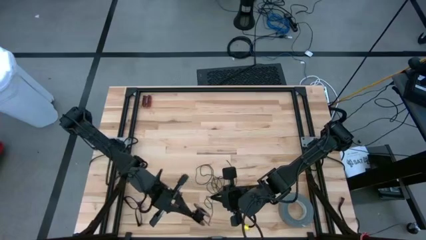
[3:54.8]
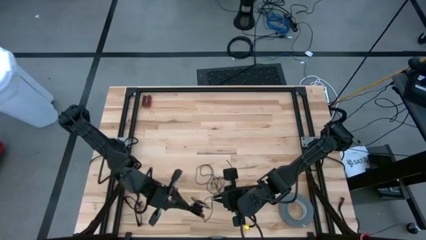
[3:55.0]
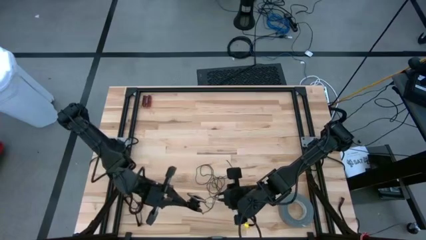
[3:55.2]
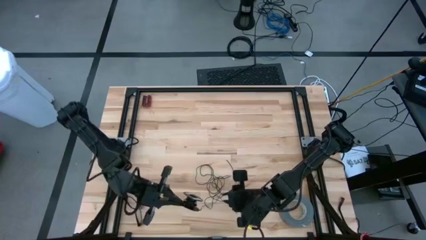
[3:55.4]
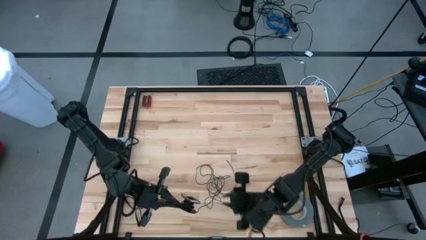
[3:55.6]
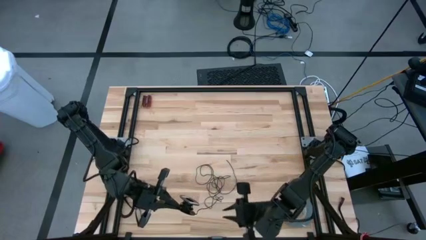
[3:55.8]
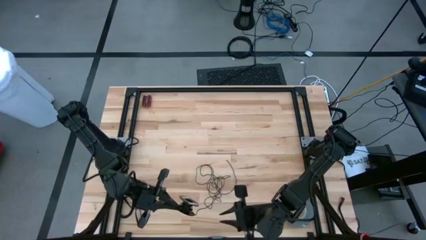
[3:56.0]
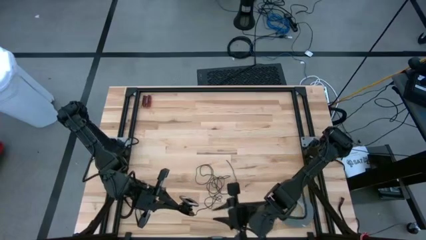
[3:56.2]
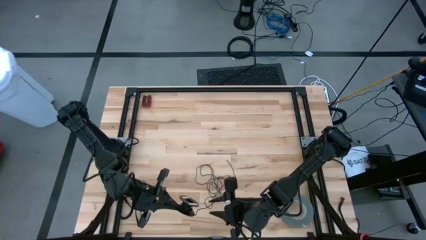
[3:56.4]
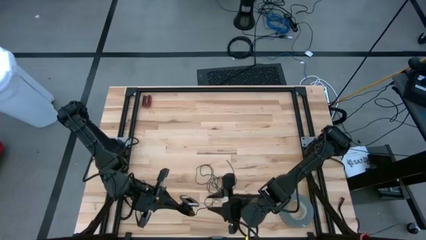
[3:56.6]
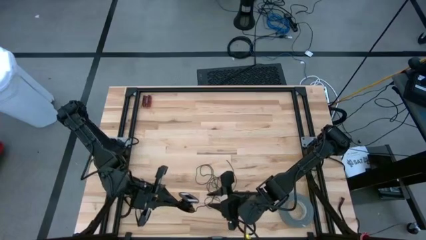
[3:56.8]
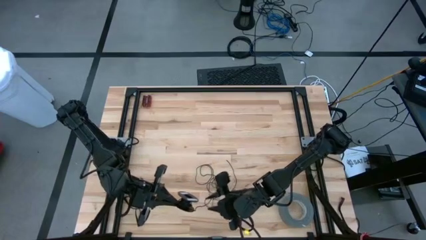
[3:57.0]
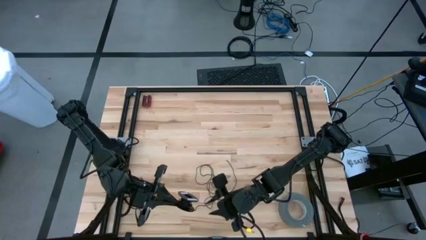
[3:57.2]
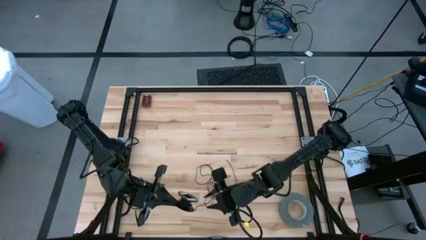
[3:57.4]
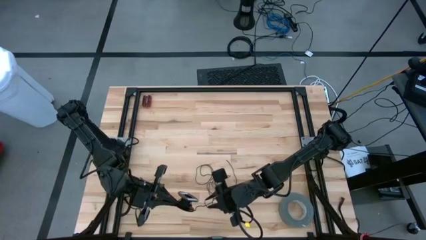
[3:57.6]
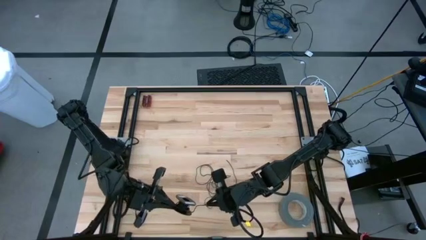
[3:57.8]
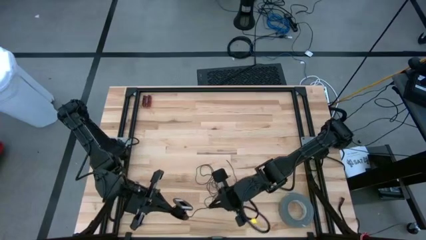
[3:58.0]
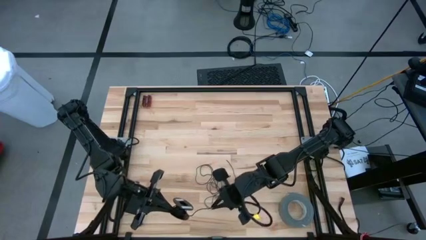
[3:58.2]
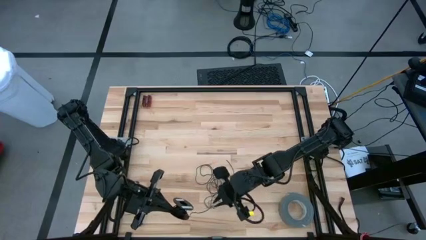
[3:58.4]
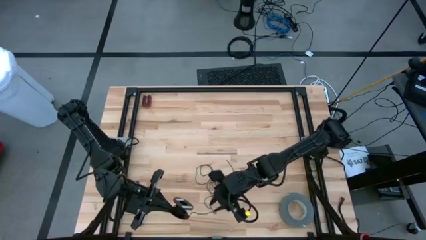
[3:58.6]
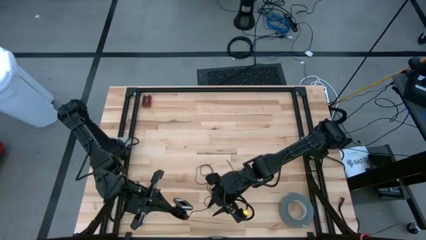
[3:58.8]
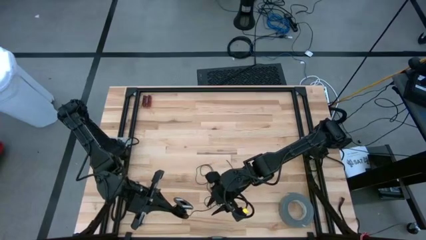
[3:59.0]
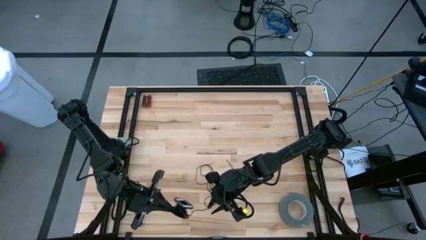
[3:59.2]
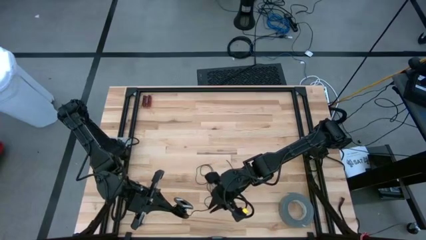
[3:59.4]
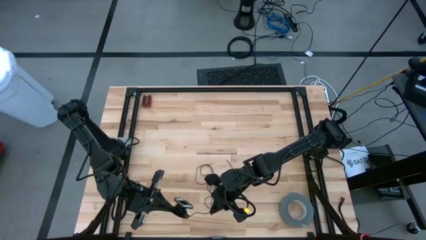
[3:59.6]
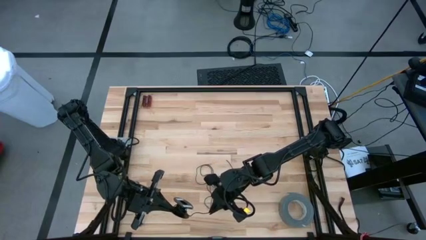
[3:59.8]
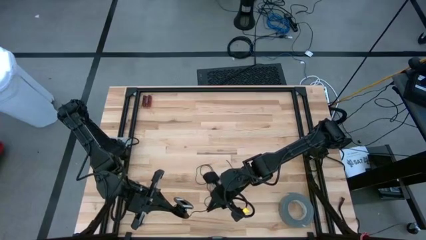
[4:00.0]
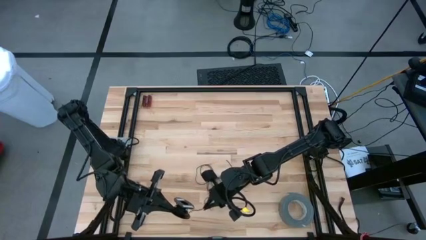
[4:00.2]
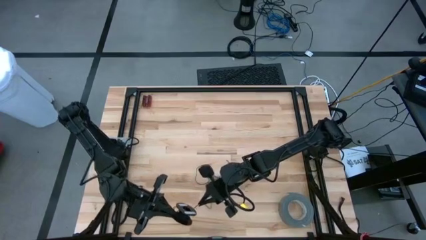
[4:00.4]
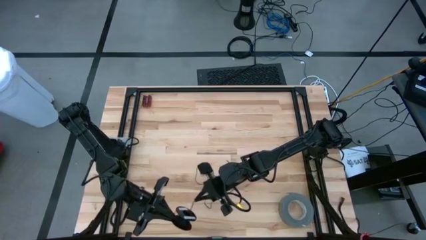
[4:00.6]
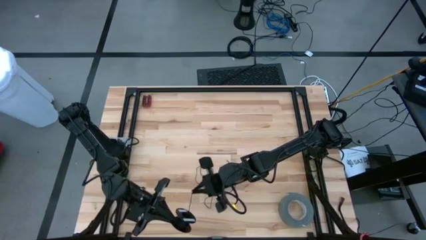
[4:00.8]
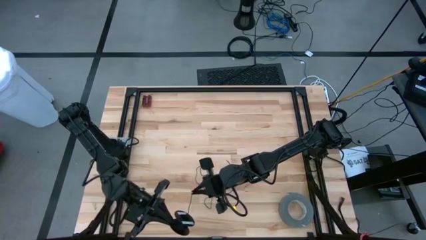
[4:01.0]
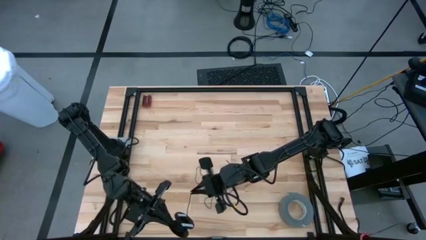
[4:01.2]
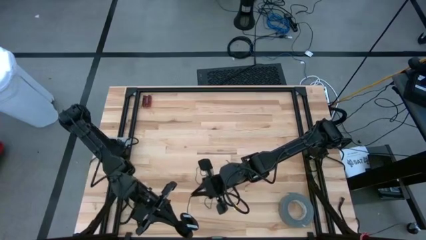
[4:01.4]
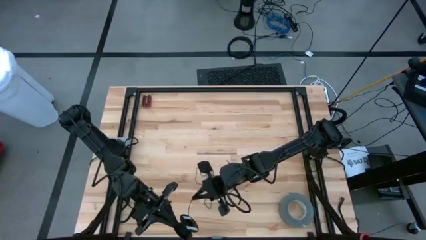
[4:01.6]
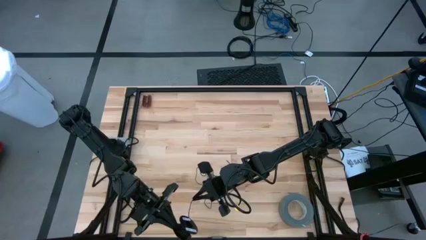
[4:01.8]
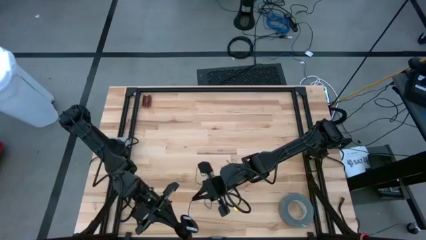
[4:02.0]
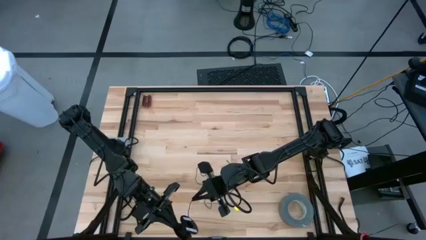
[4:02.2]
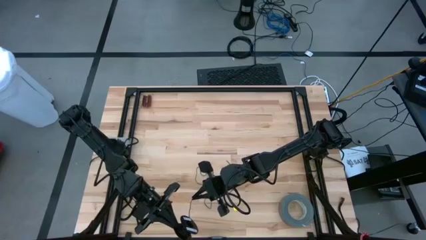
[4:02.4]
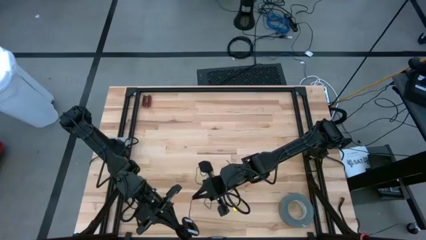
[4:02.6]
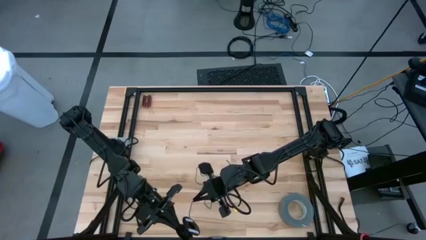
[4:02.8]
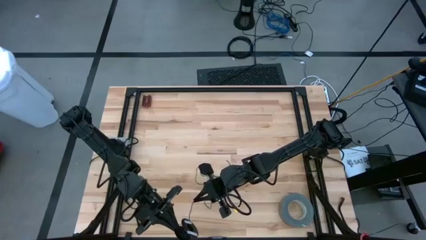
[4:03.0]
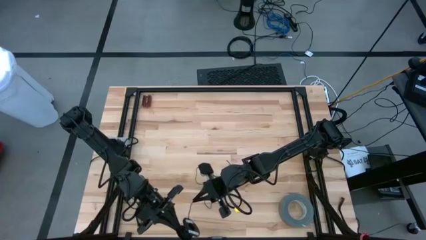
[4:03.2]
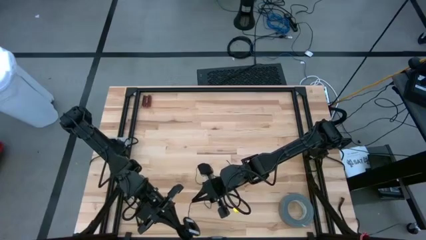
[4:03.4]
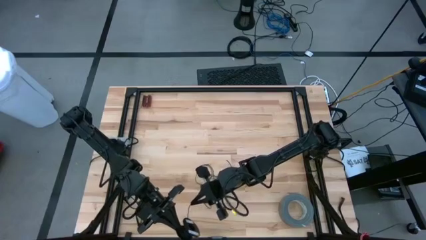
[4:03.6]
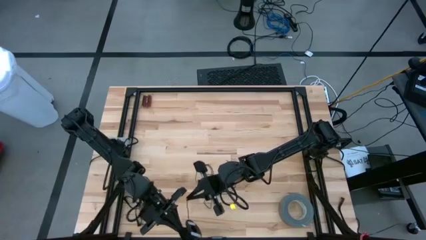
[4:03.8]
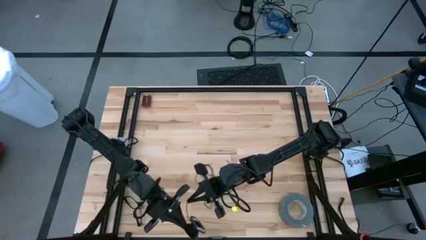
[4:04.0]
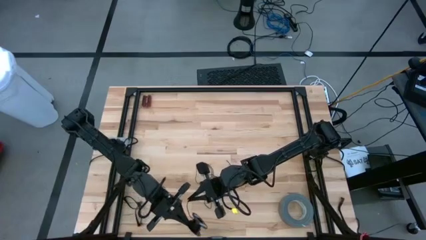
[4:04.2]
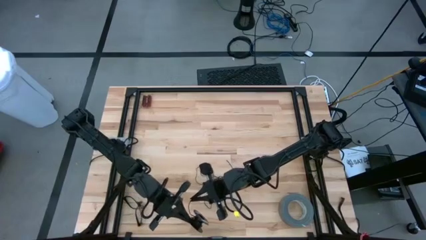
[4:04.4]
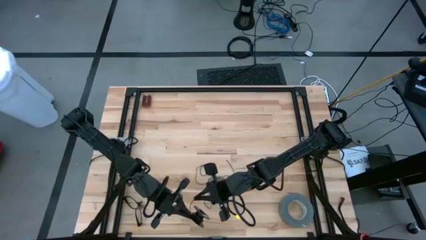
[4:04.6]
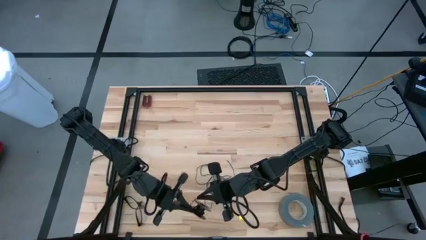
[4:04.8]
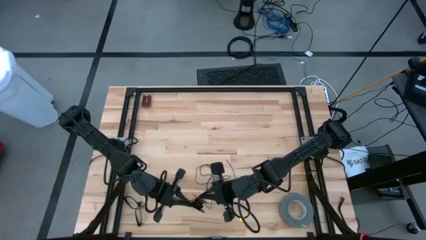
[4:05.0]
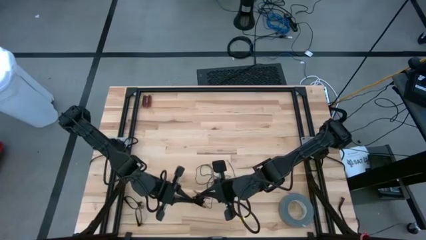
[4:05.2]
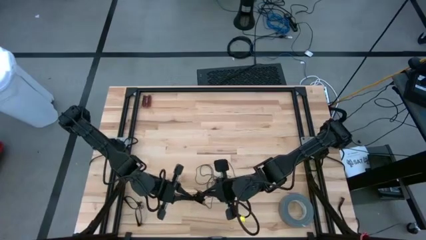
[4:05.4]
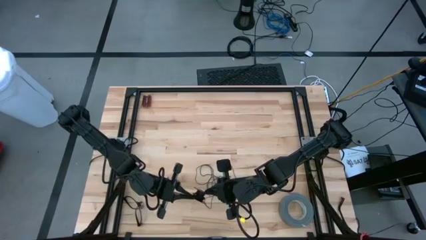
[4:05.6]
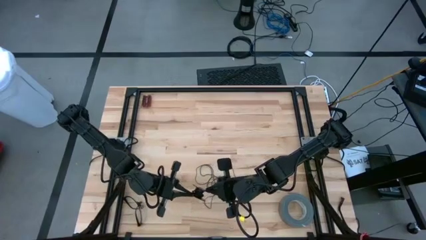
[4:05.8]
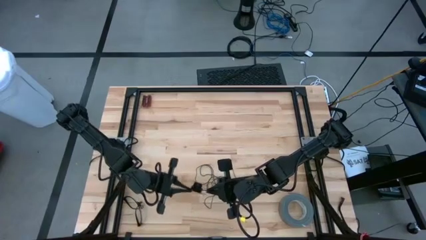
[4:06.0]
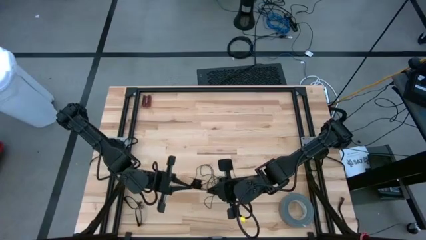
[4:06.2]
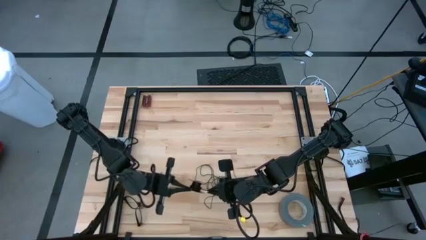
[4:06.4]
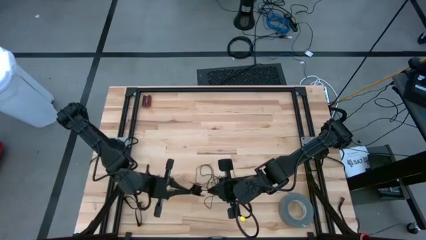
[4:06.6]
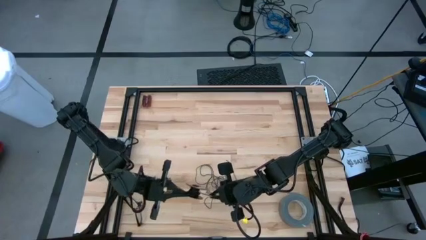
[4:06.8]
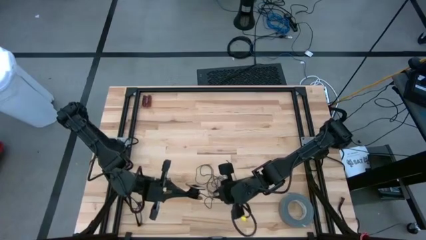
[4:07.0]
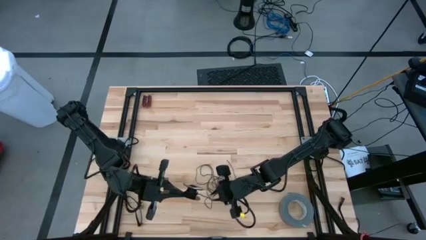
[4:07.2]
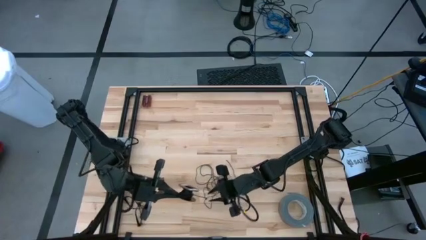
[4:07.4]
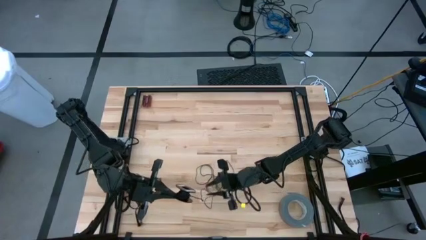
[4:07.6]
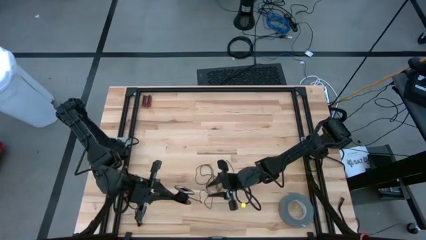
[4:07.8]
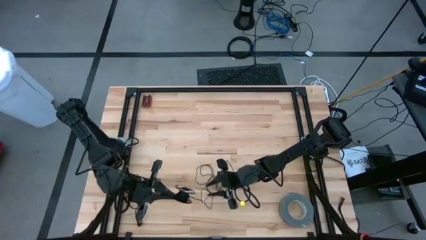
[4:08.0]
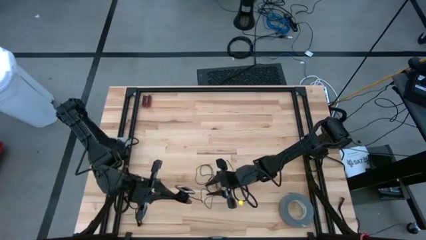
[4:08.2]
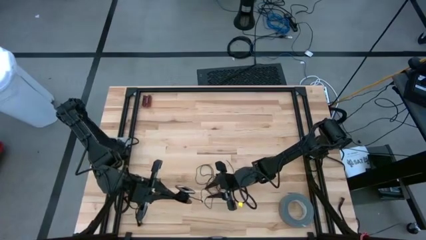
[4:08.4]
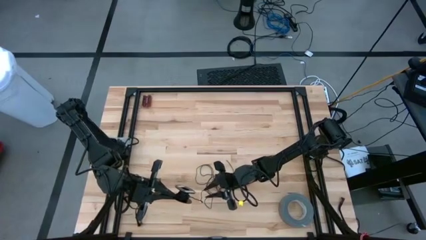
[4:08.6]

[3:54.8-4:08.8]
Task: Coil cords
Coil the black wire on the spool

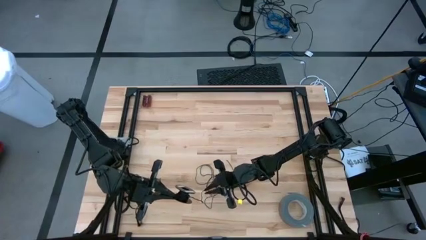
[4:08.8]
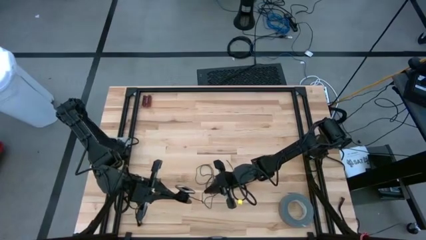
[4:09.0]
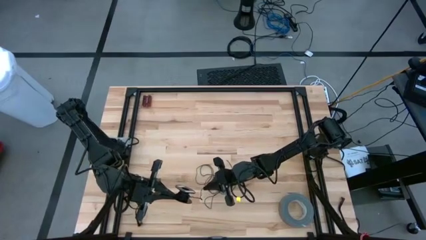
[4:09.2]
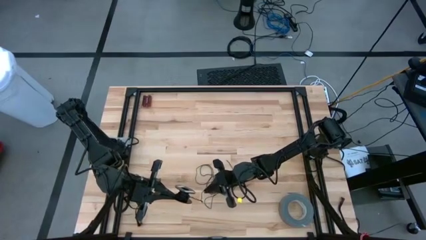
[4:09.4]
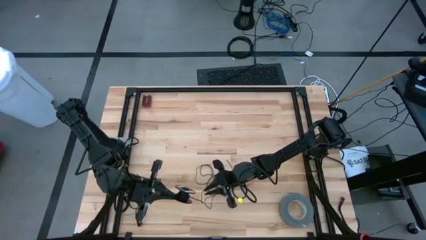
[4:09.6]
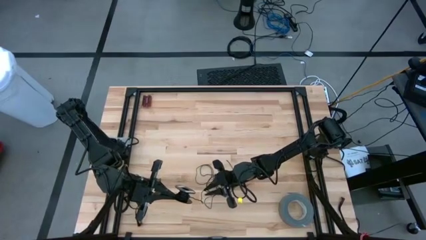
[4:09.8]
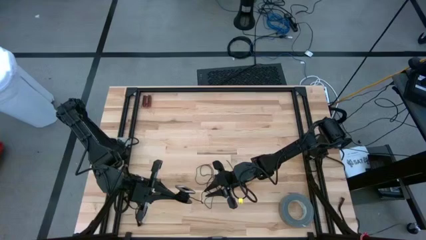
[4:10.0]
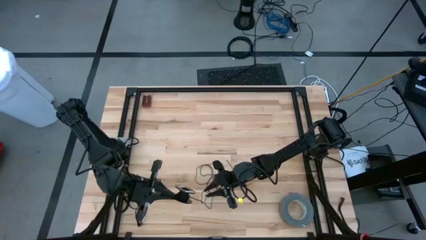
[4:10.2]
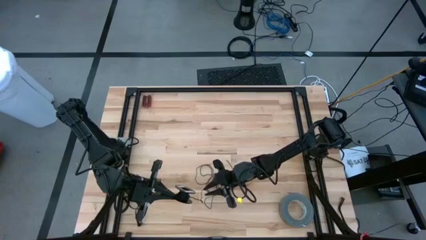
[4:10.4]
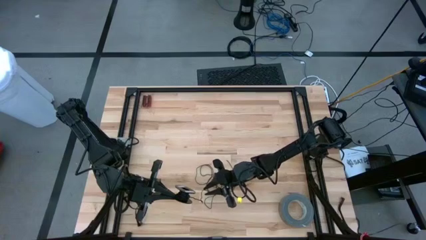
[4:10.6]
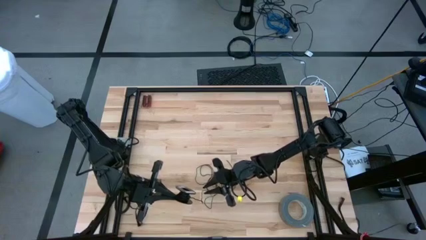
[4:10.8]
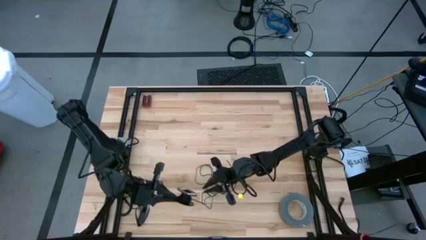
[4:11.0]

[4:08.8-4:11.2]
Coil the black wire on the spool
